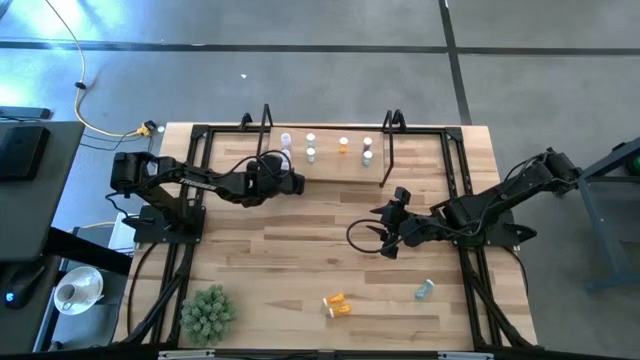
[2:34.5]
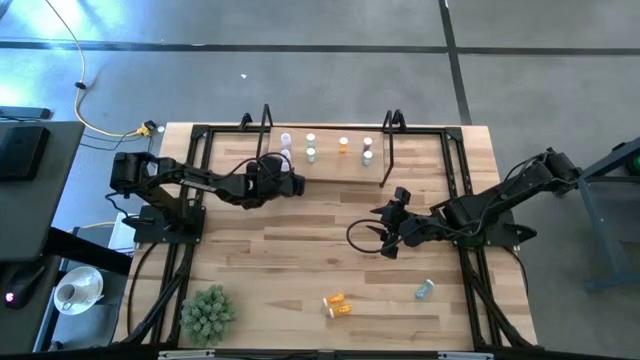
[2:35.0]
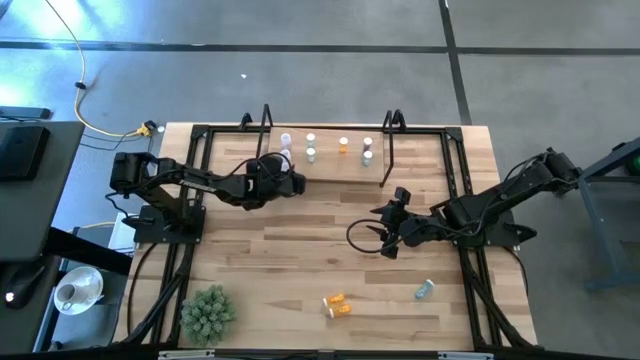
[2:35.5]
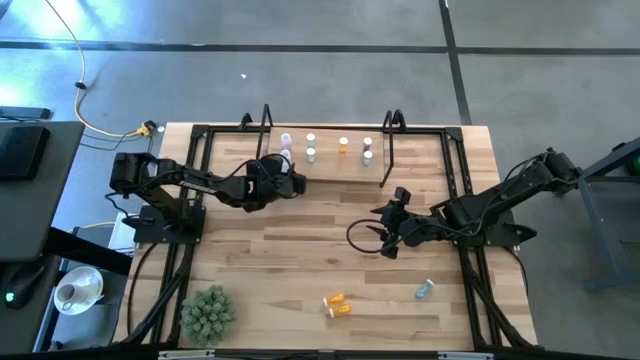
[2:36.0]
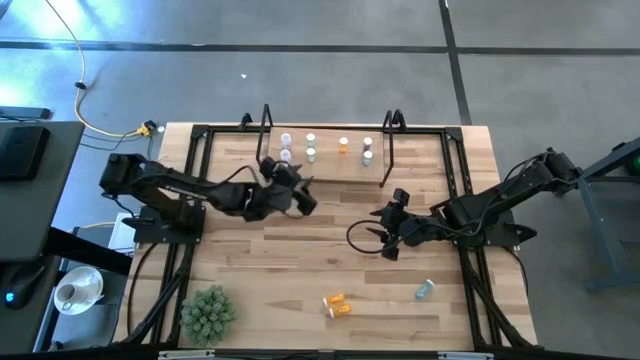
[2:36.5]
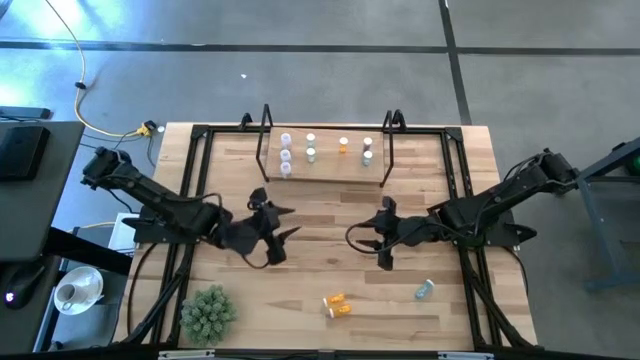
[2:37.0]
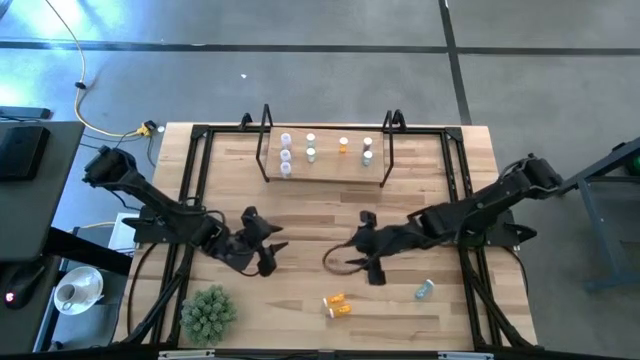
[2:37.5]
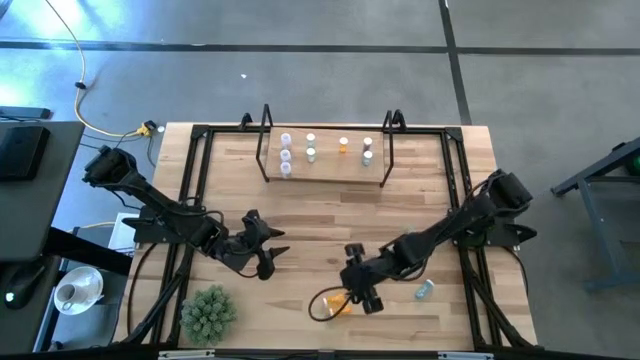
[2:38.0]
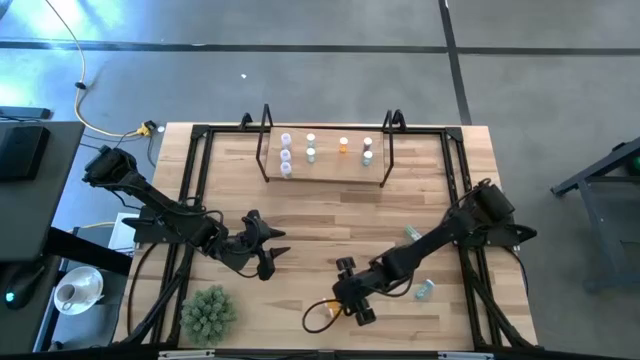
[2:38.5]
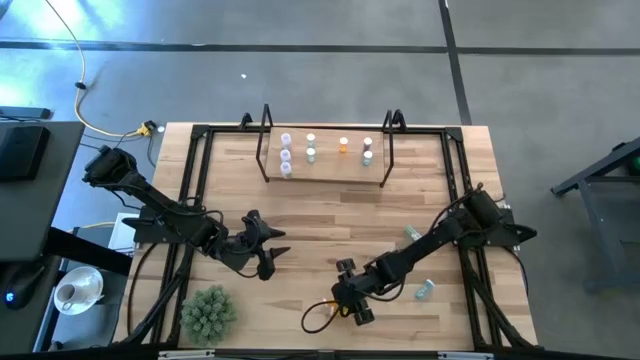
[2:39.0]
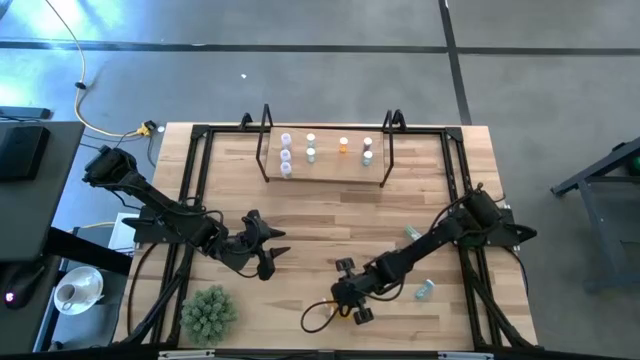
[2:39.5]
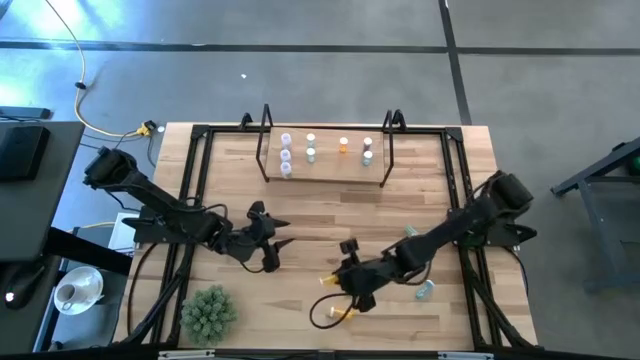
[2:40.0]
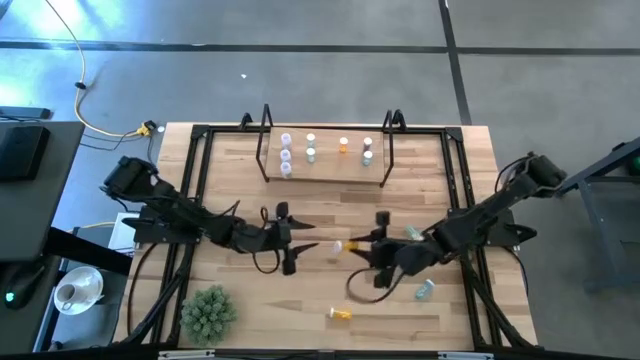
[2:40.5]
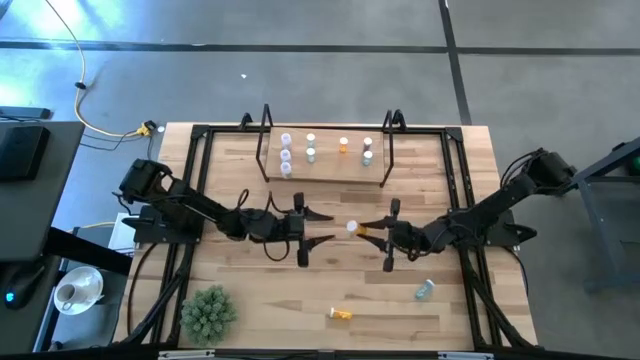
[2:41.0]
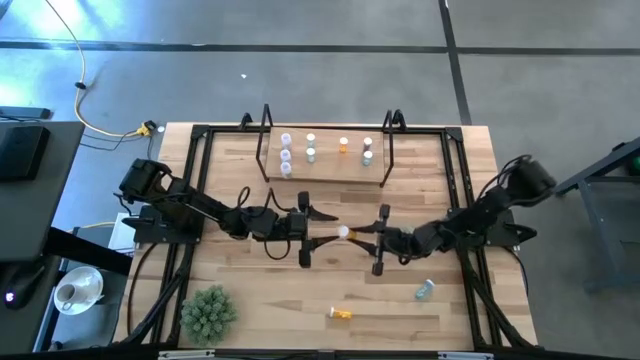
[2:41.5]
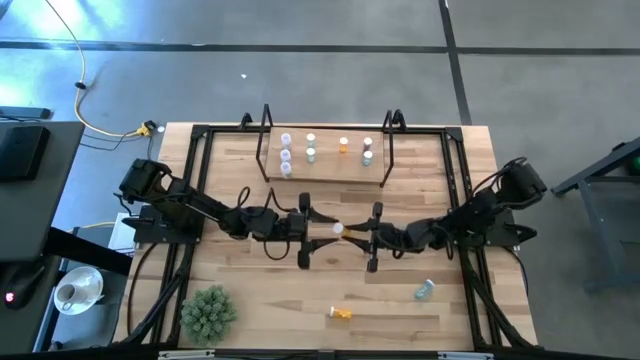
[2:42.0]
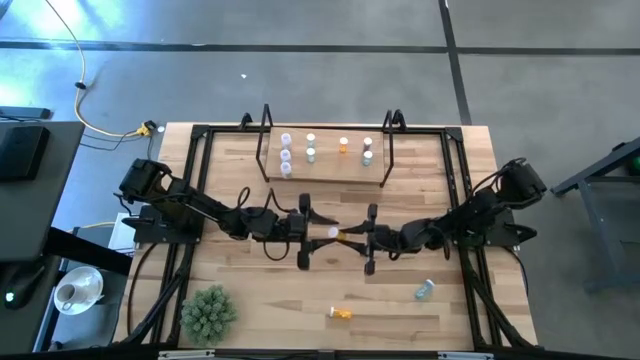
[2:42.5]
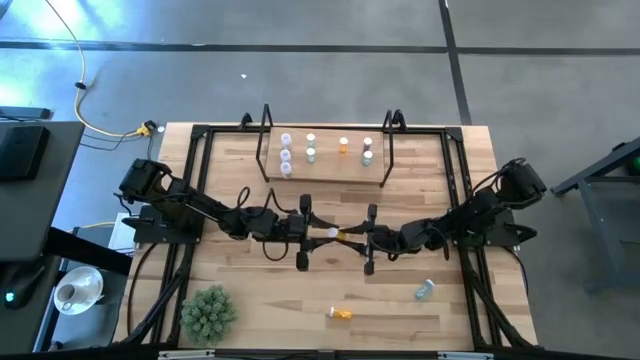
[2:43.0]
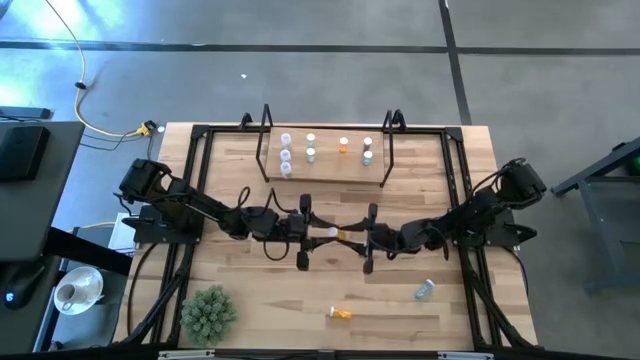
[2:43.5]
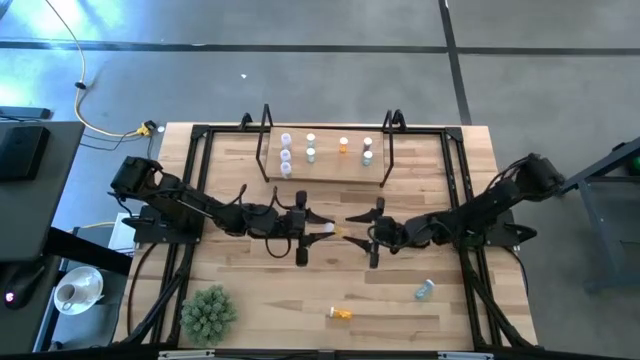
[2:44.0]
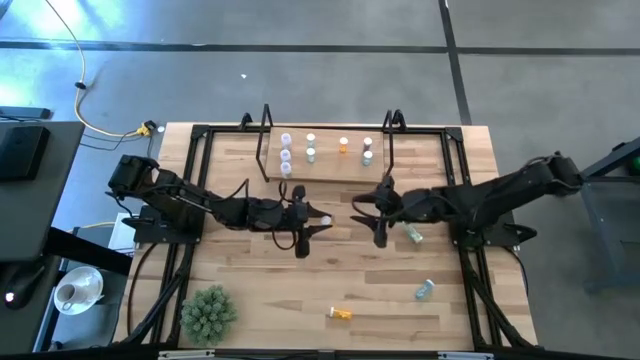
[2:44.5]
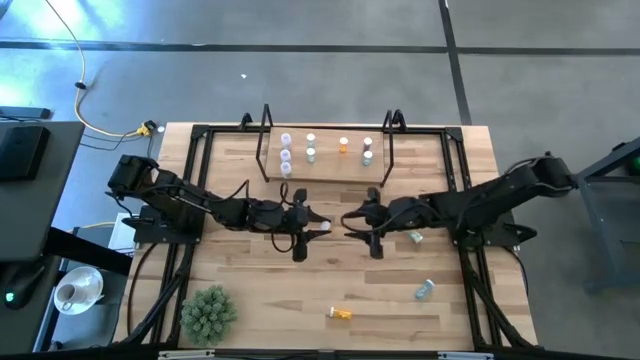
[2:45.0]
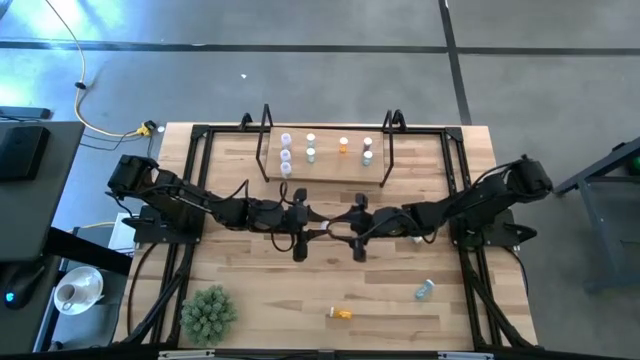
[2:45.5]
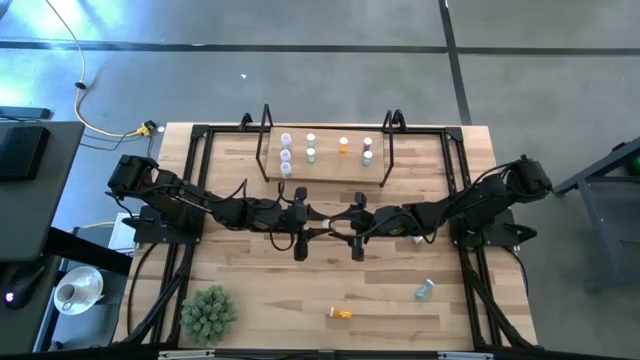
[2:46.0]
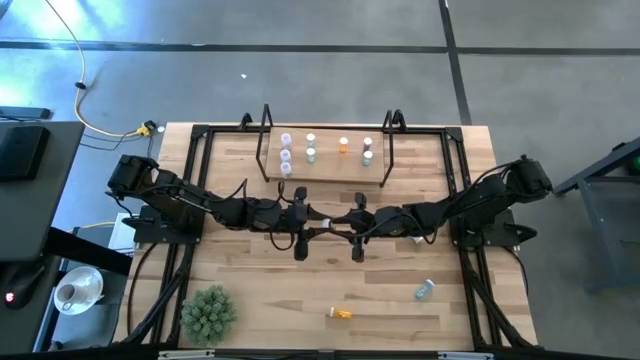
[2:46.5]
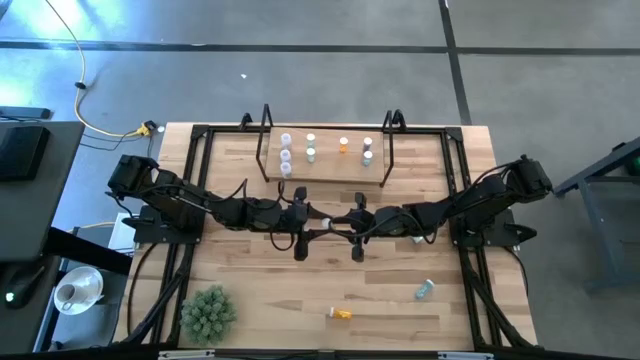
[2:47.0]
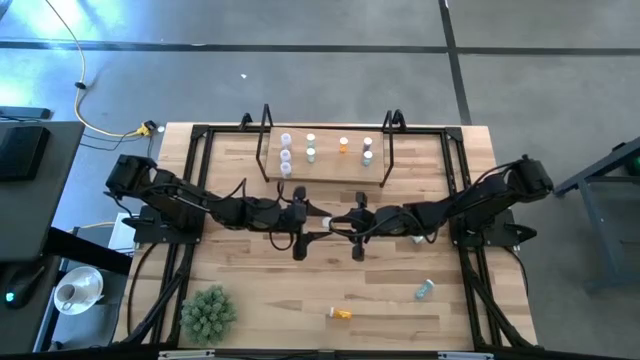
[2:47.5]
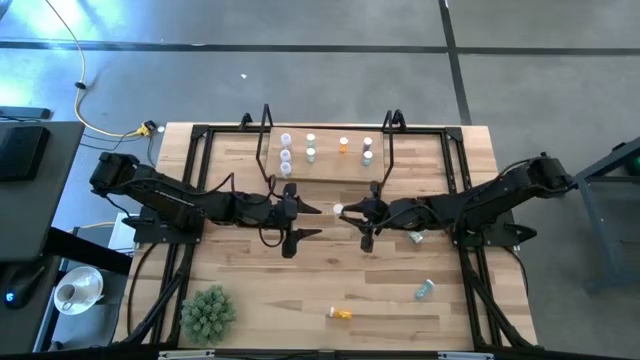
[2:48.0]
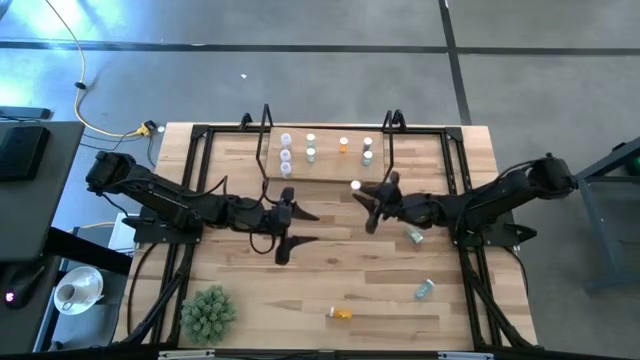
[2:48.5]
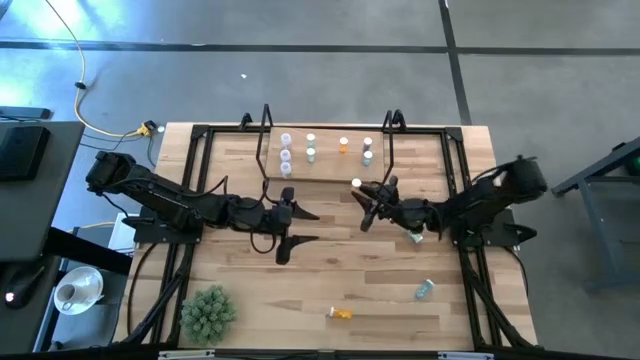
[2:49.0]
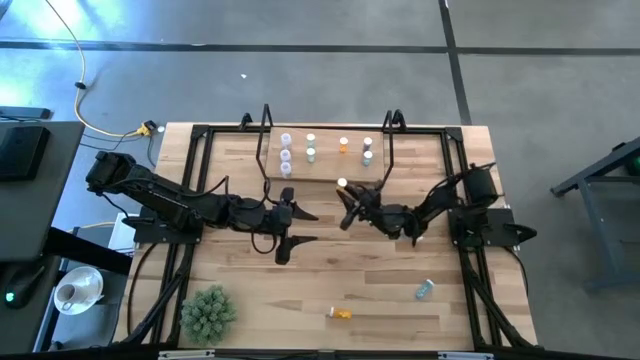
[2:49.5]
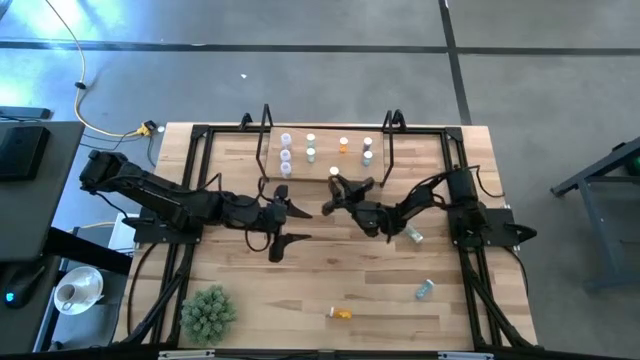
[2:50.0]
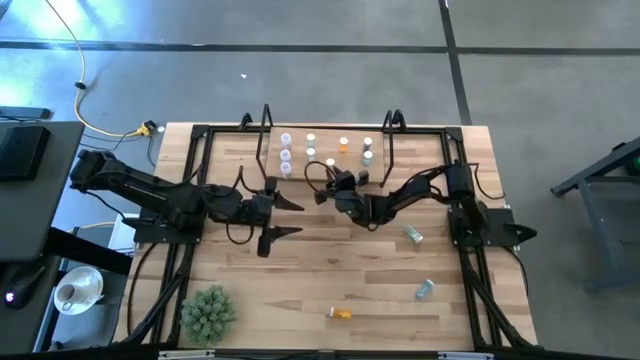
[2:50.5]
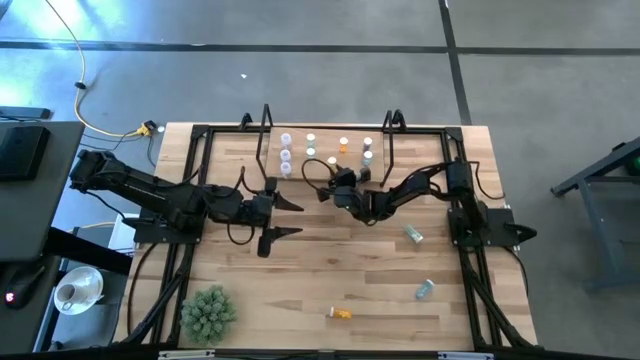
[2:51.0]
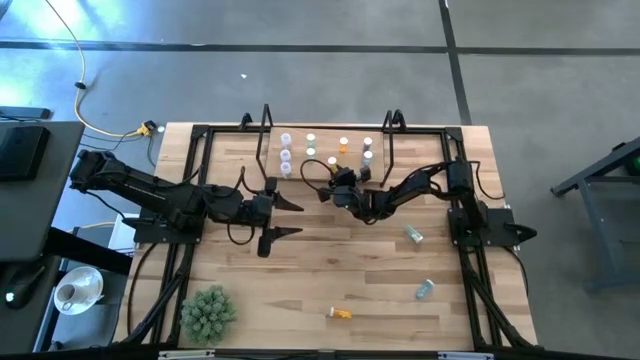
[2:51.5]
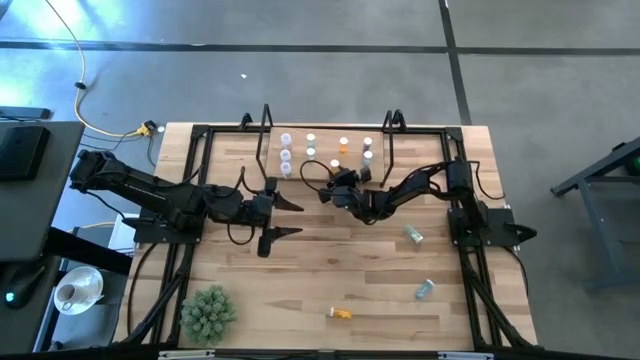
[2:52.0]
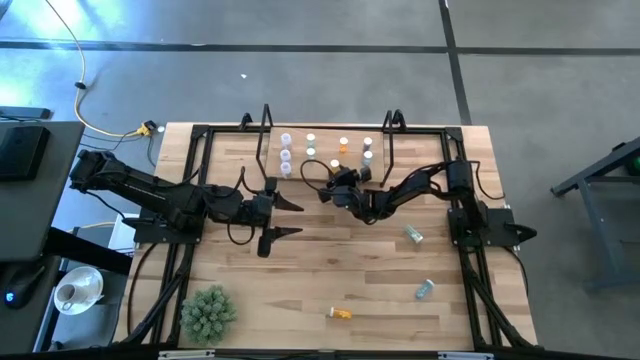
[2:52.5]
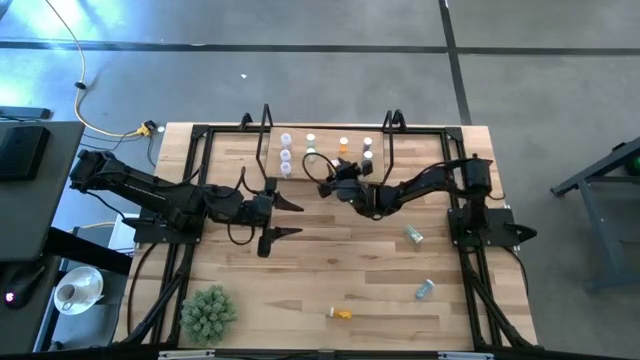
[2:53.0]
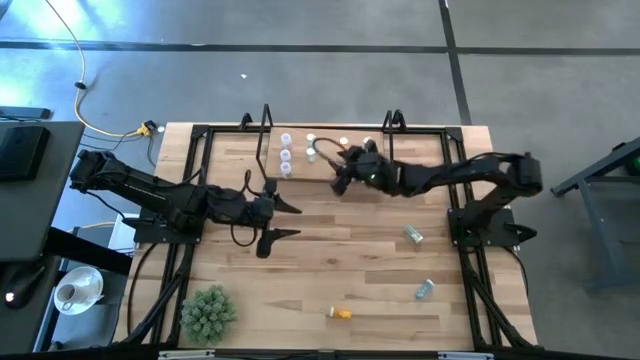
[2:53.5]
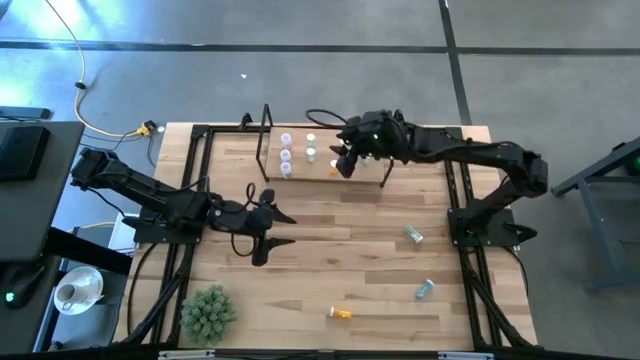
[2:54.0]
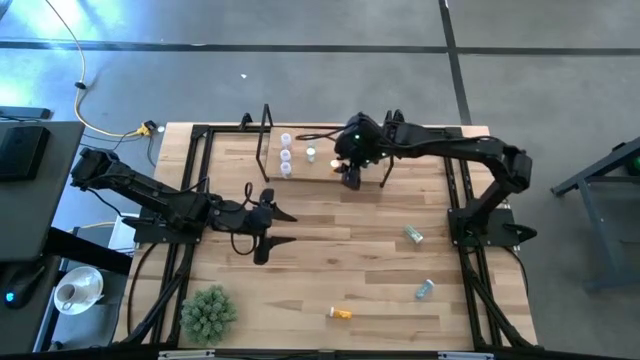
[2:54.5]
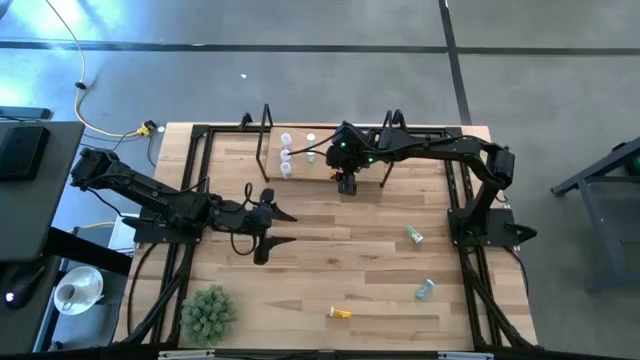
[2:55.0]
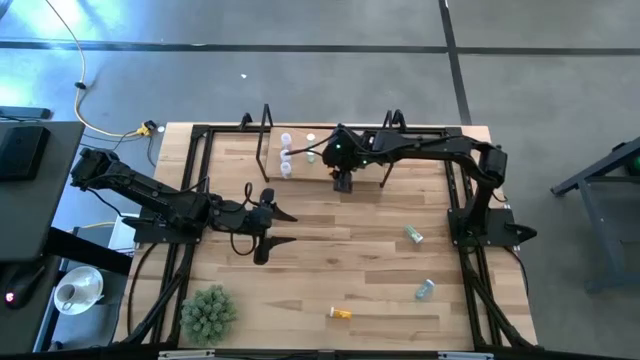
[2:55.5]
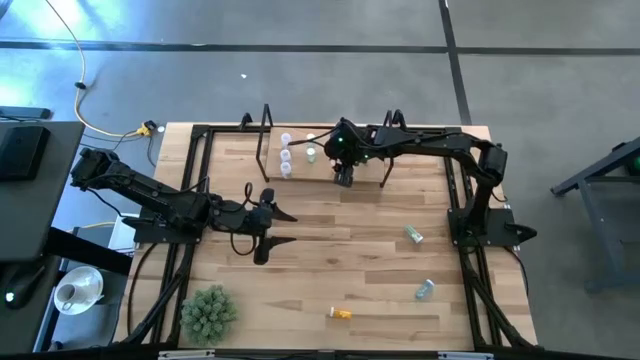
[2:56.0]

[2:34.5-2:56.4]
Task: Pick and place medicine bottles onto shelf by color
Put the top orange pill bottle on the shelf aligned with the other orange pill bottle
